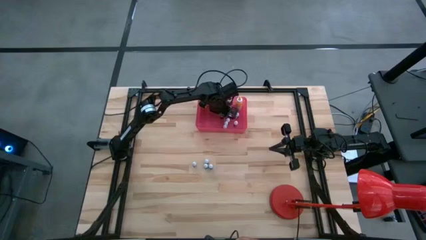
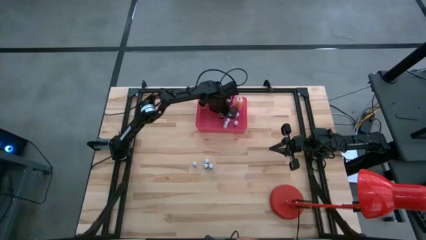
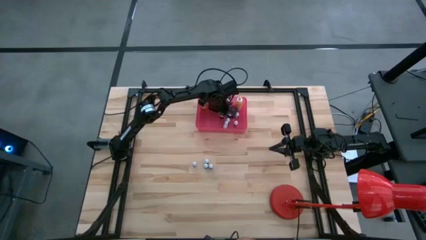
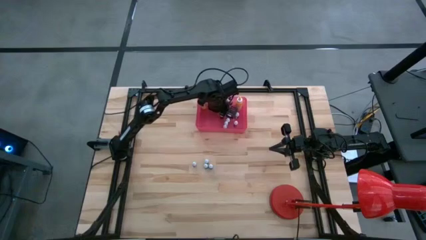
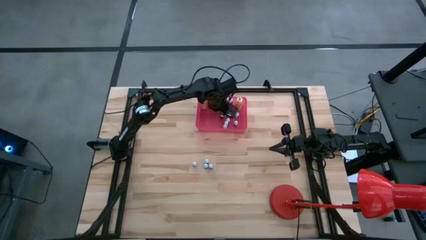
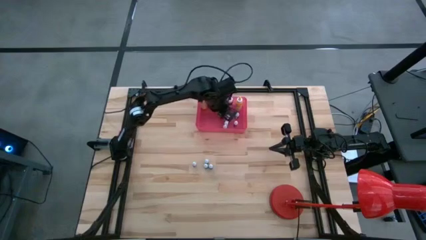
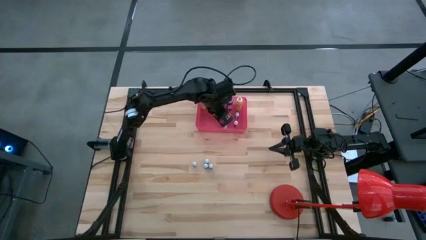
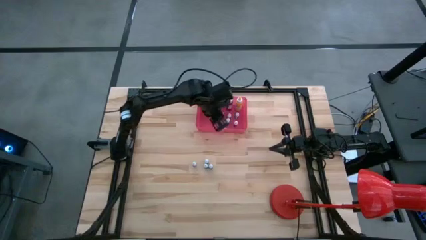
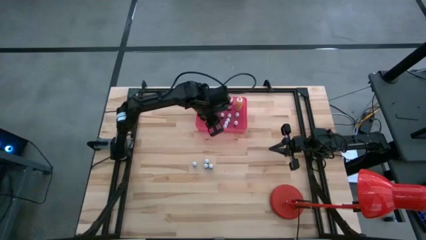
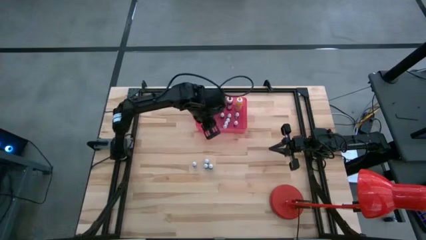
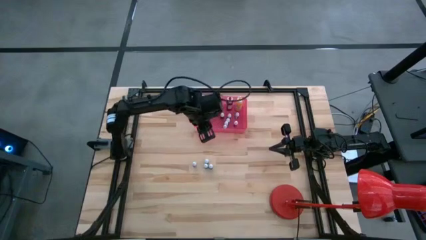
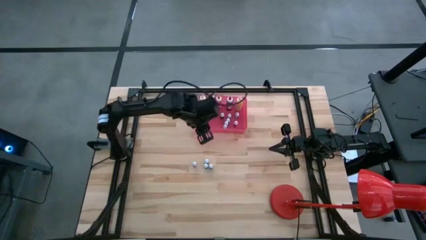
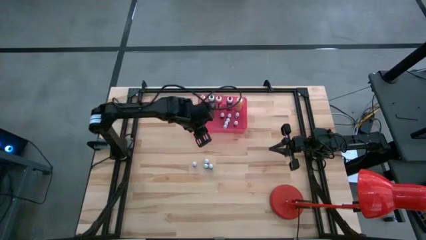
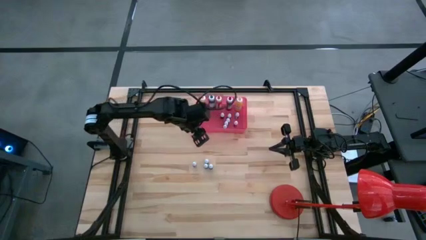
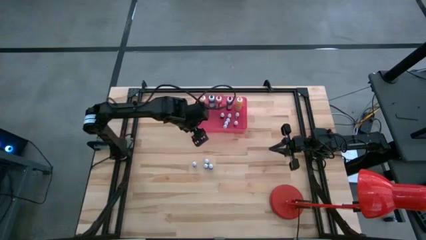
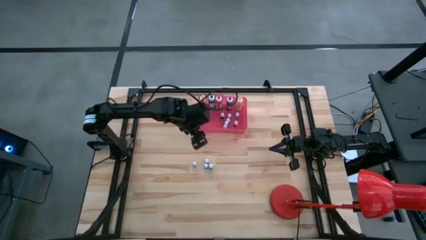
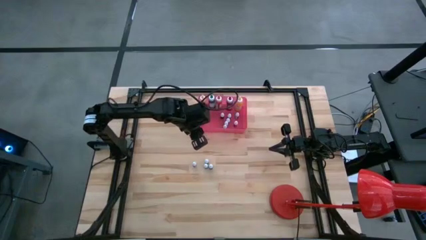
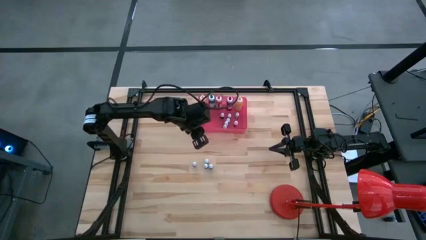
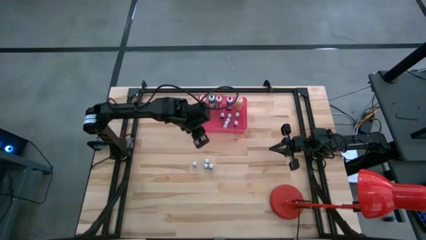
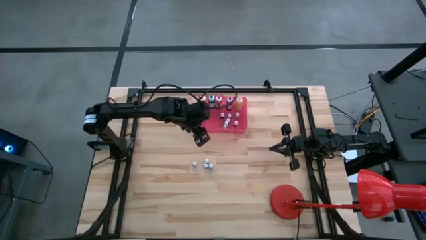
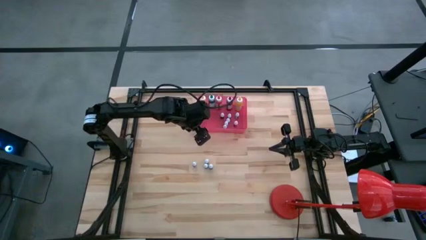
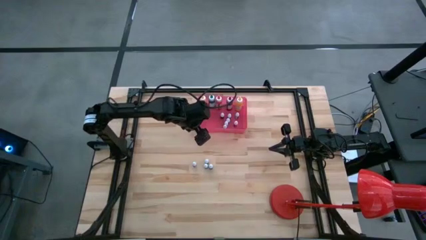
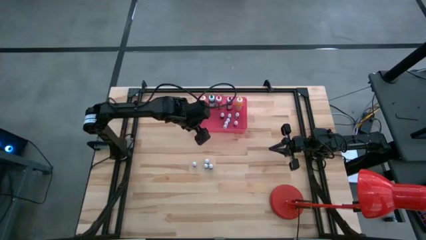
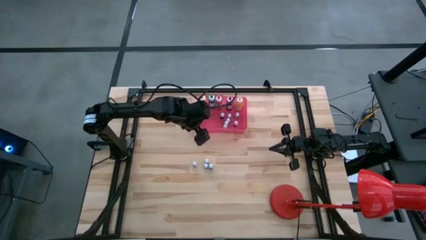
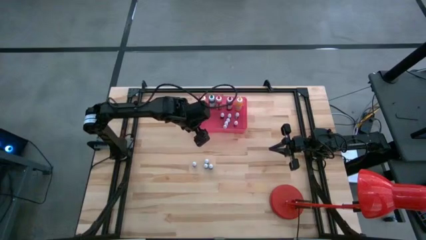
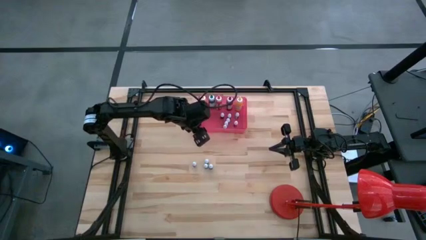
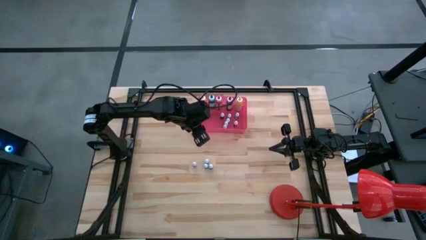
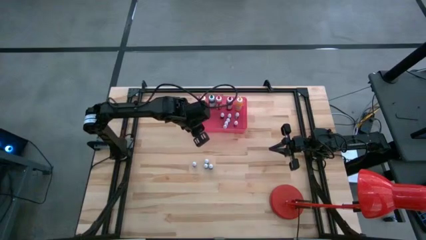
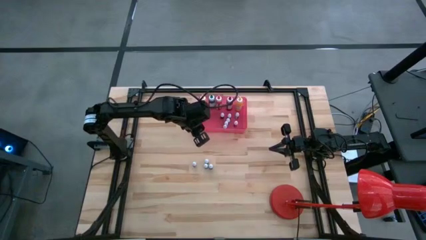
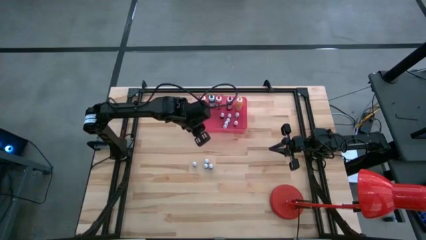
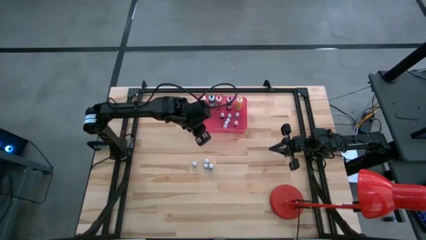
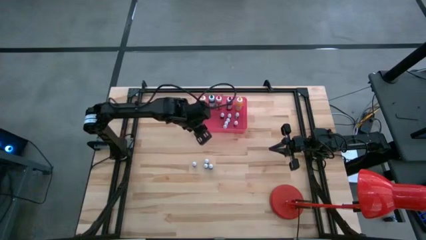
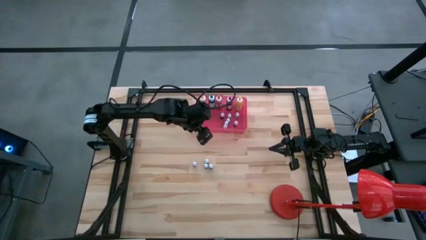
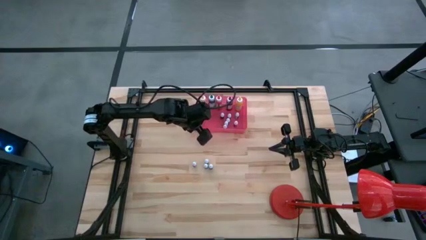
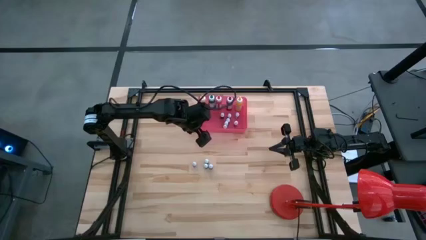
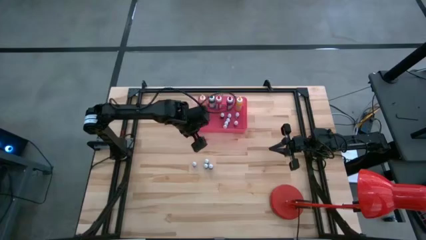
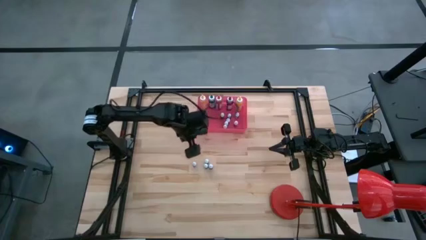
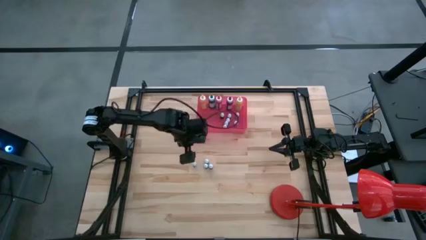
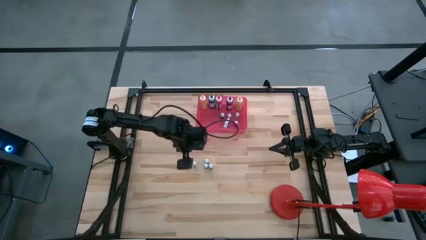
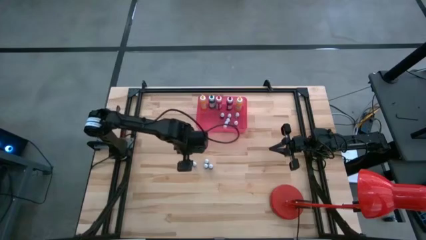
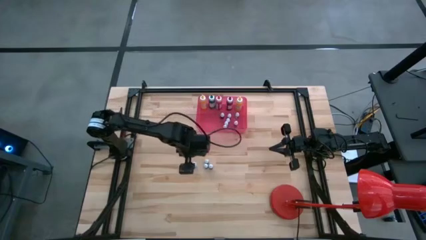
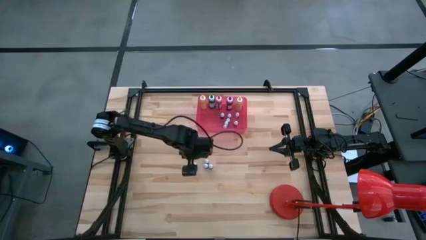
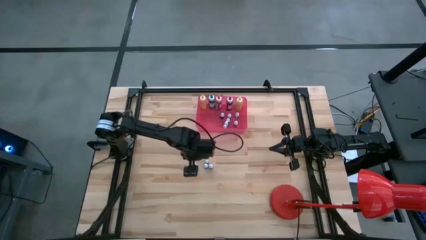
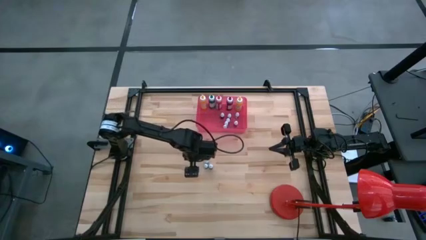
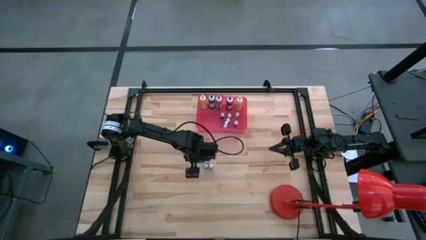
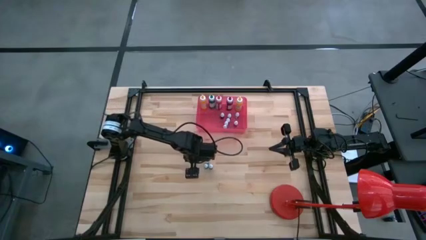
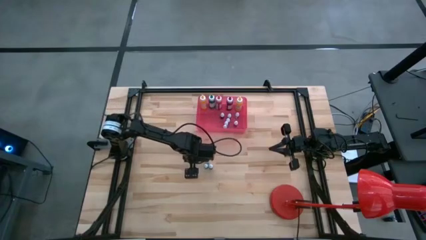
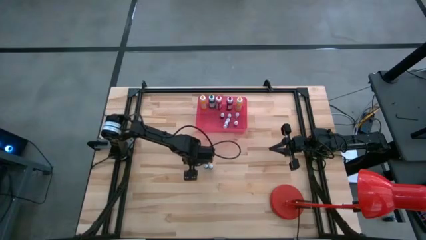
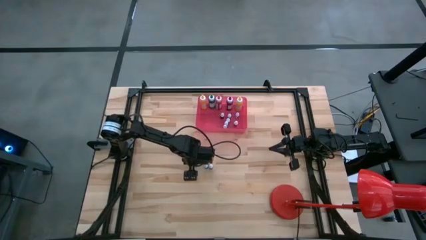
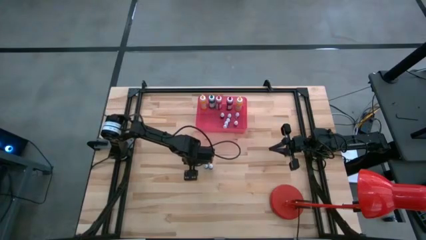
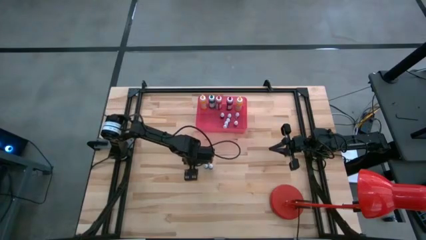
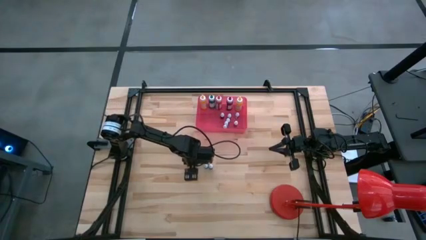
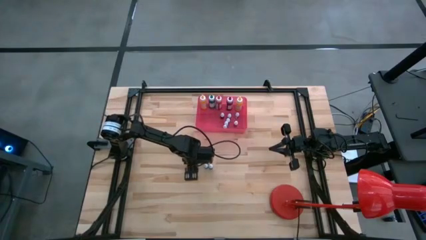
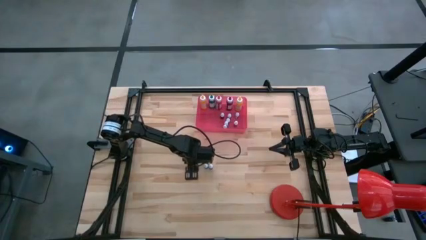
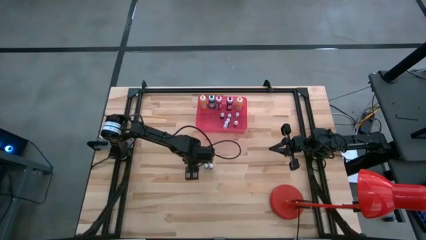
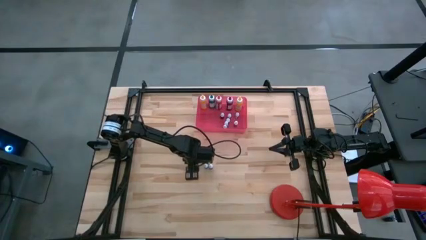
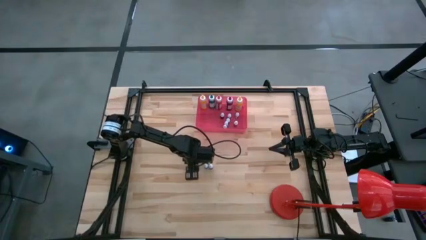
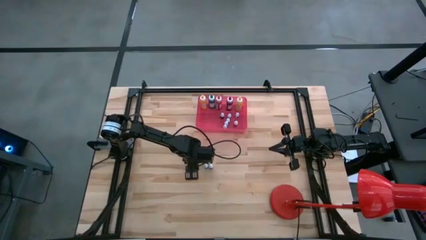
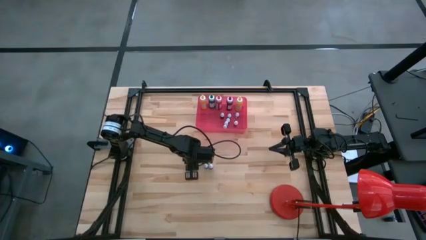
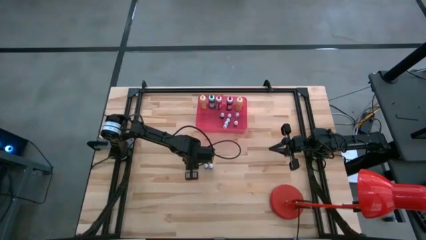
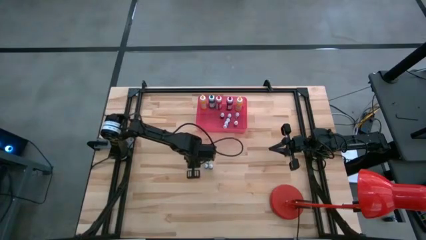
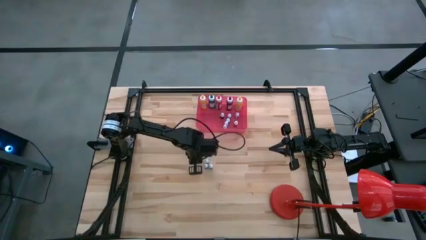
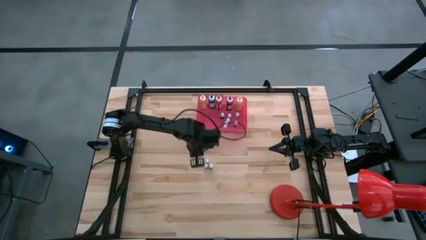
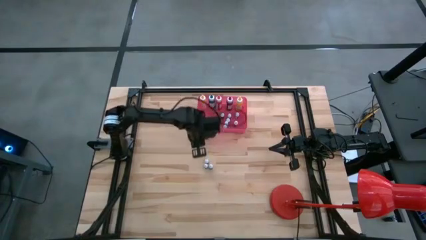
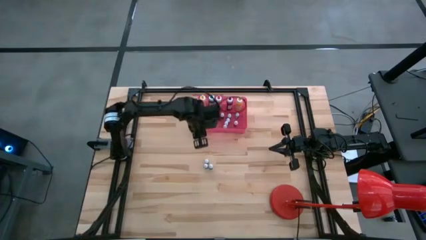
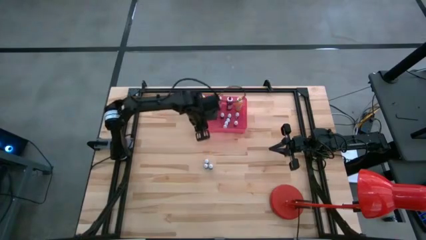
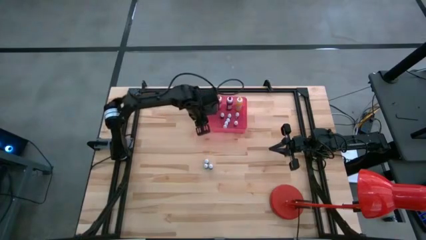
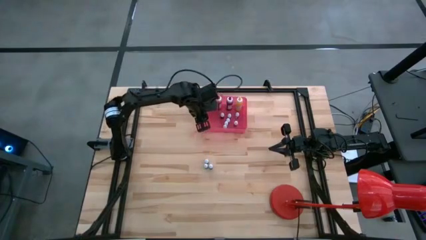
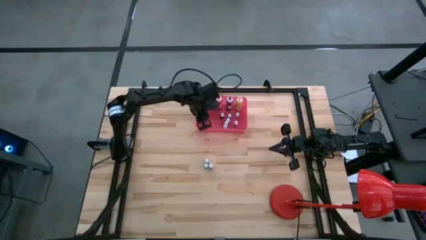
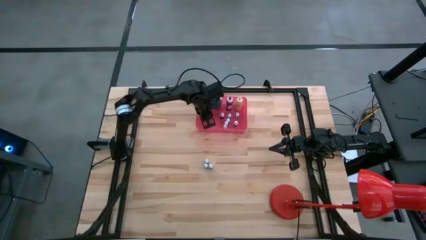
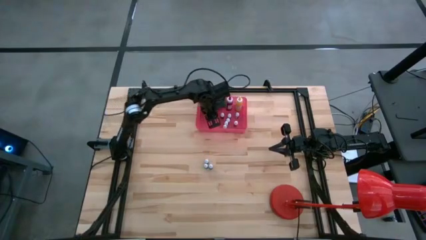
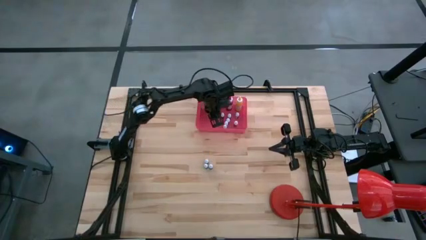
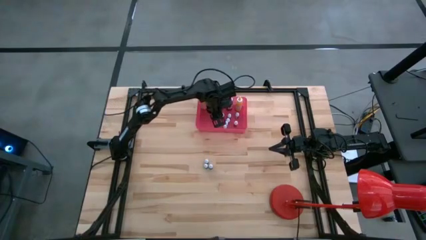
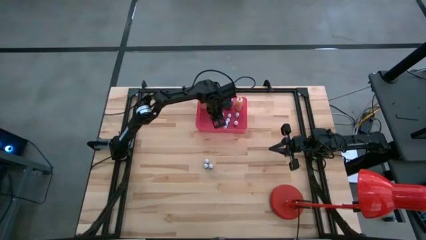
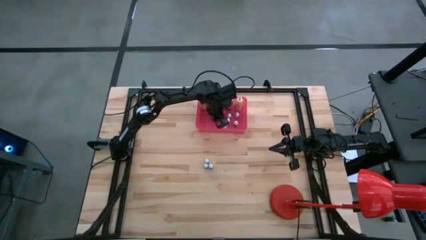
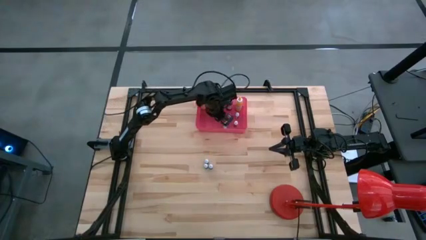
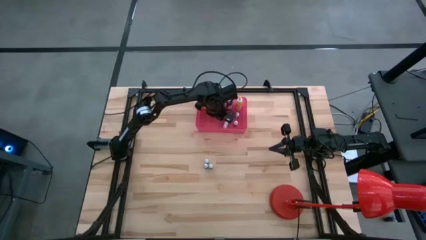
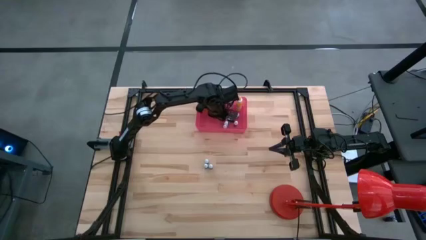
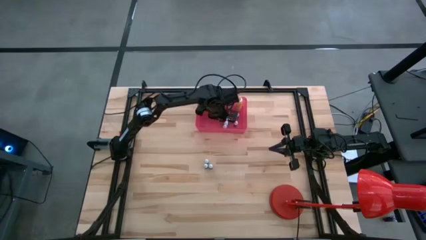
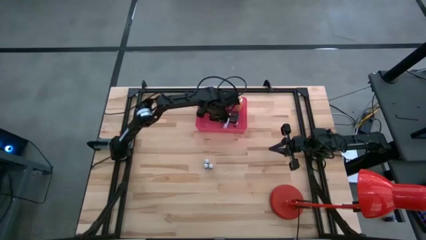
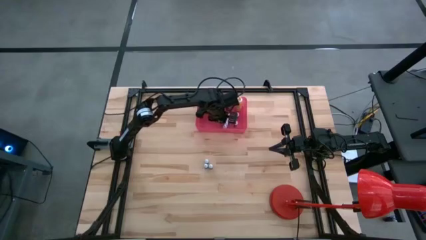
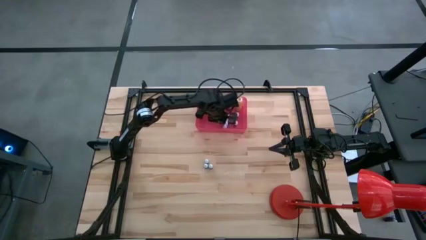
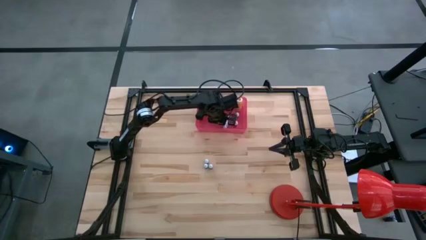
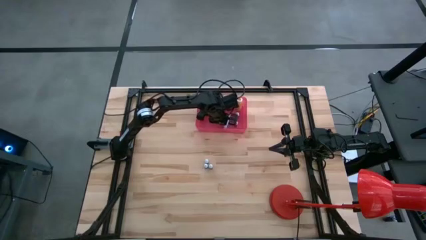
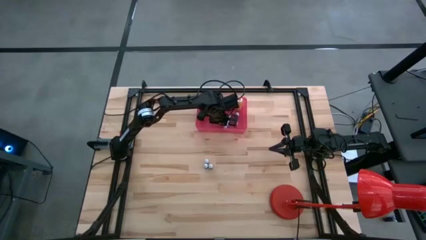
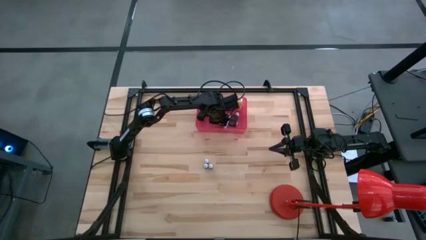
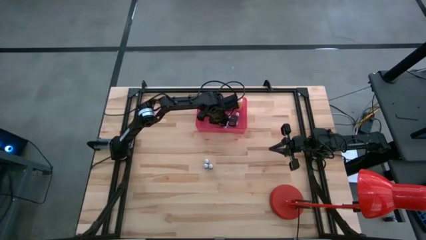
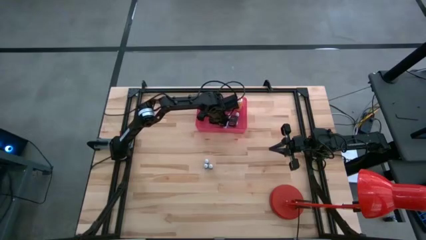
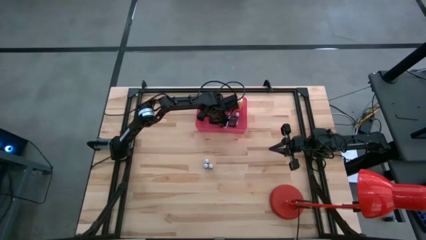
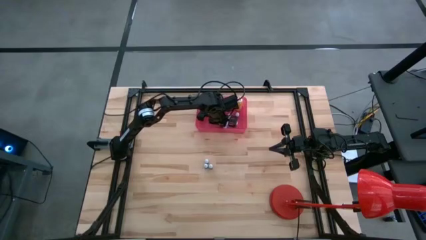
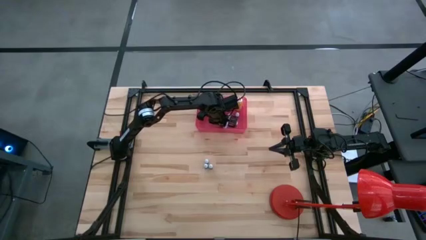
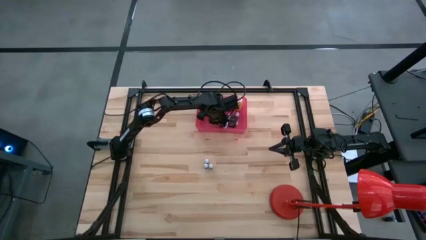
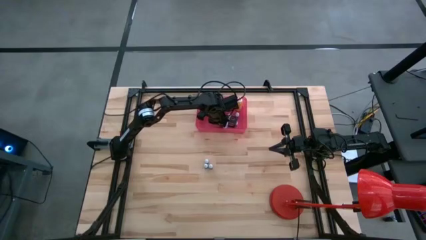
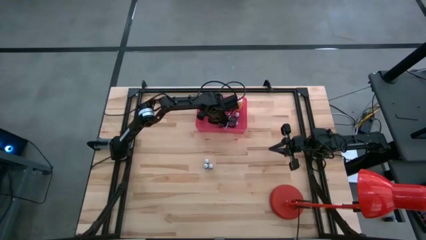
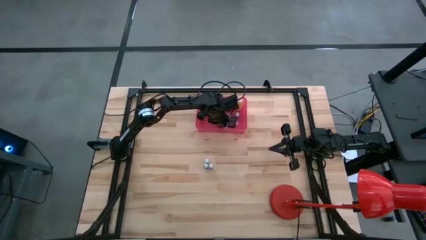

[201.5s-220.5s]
Task: Pick & Place food coloring
Put the small red food coloring bottle into the pink bin
